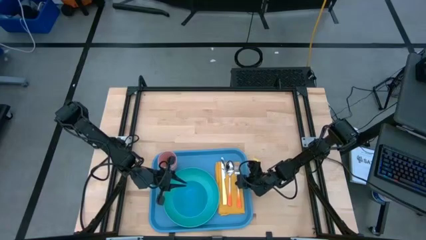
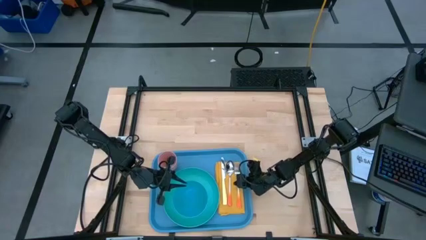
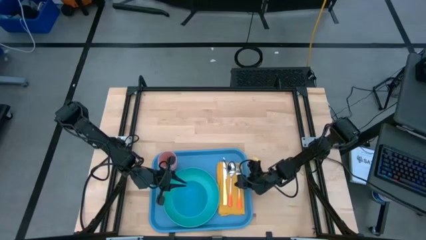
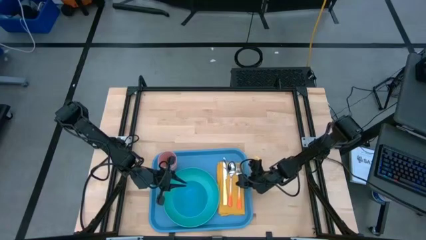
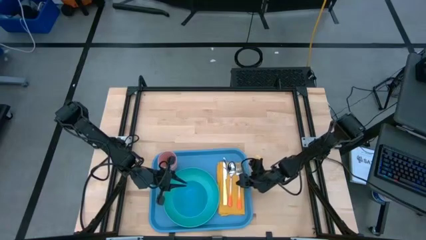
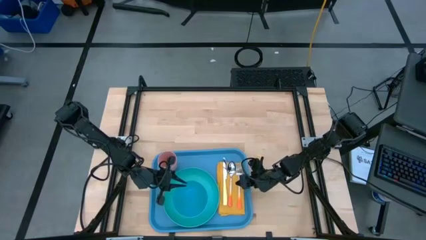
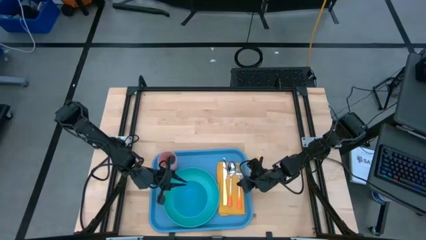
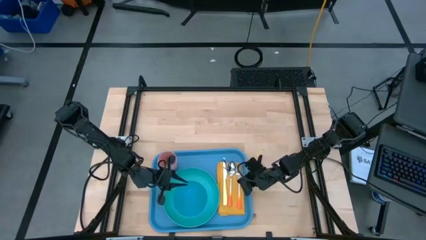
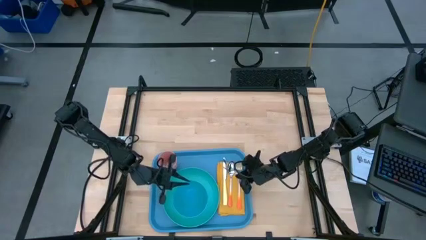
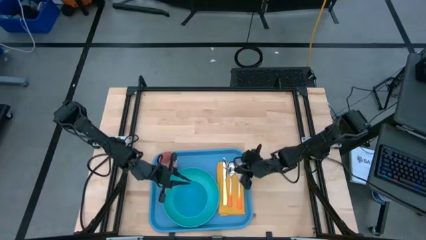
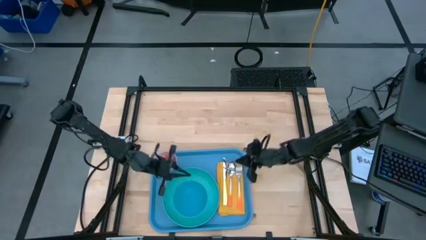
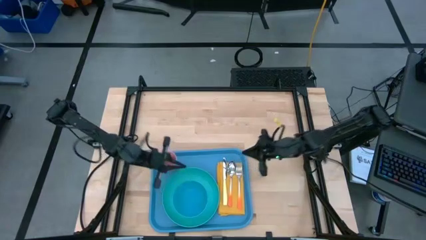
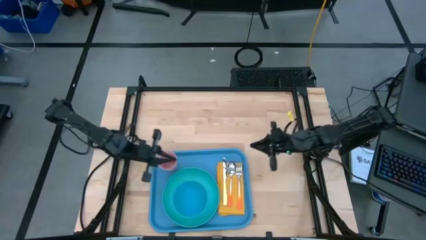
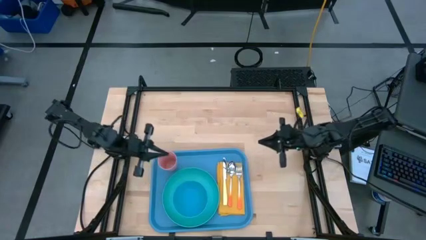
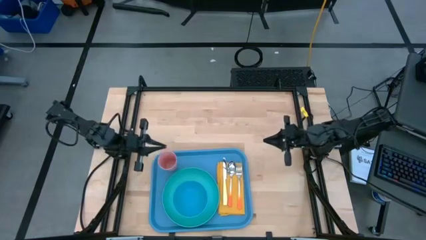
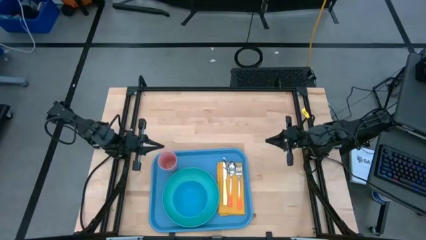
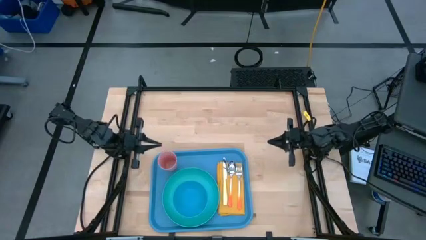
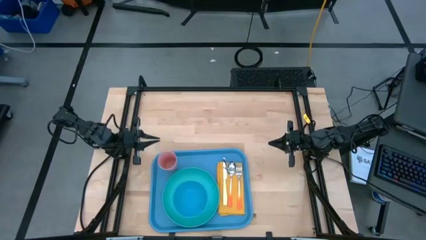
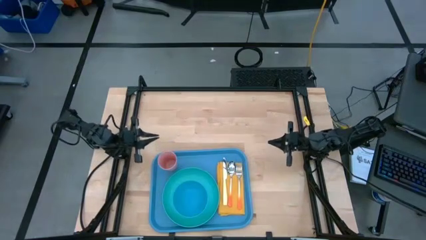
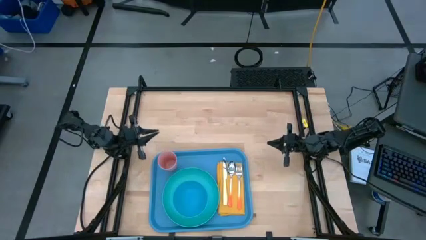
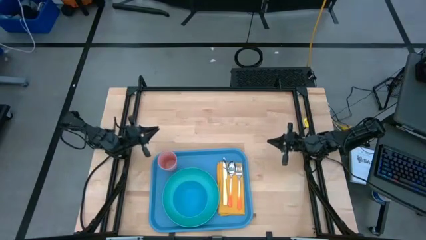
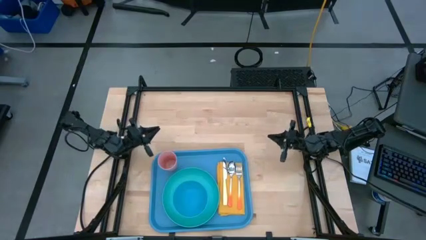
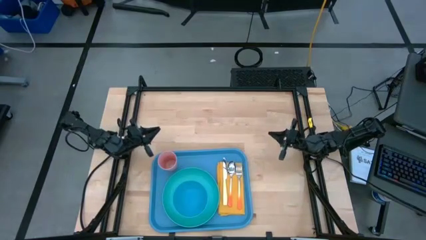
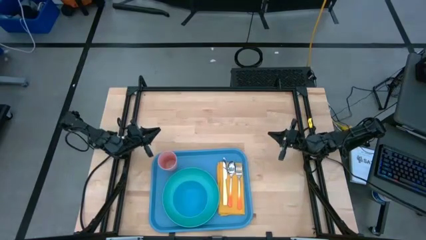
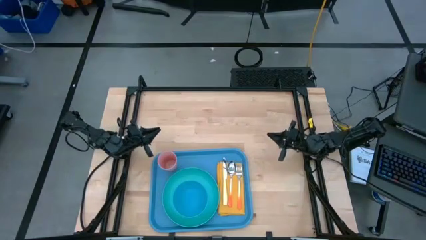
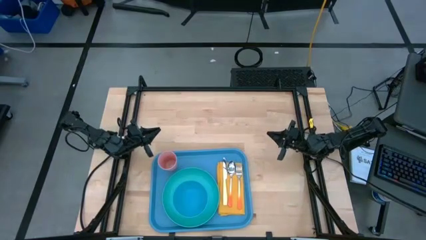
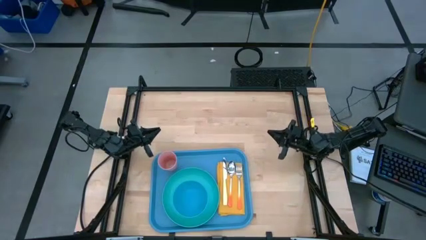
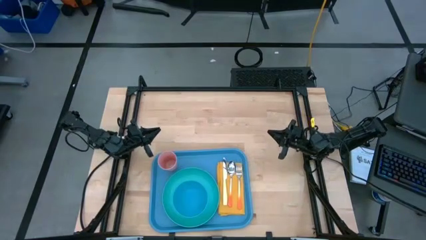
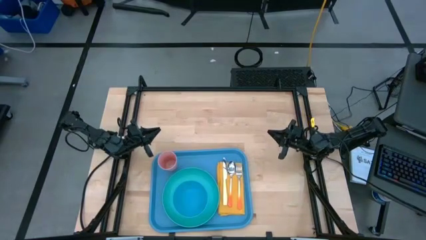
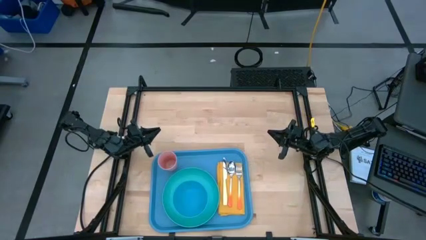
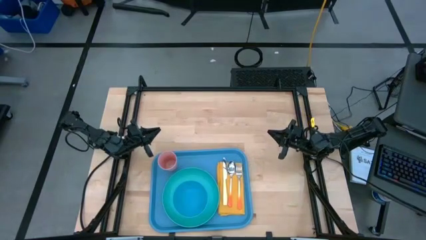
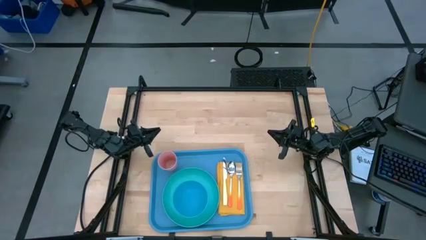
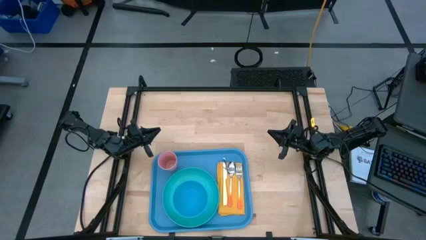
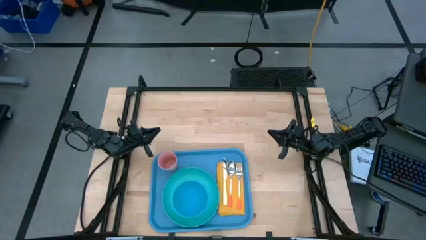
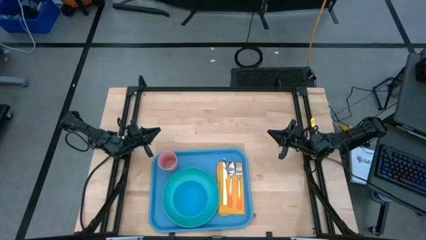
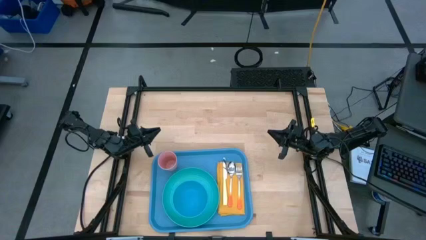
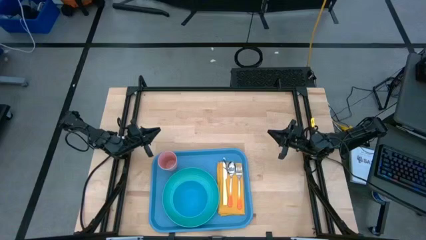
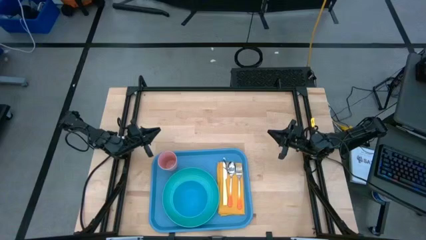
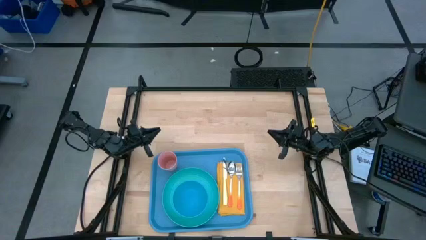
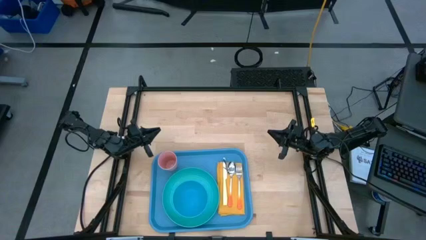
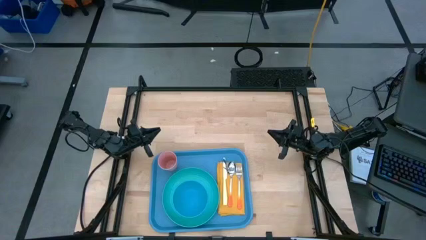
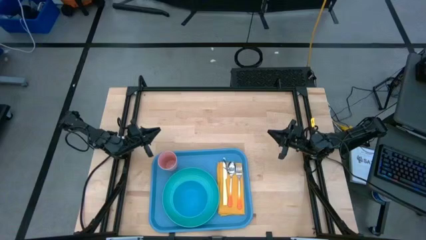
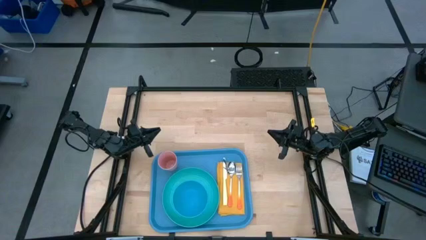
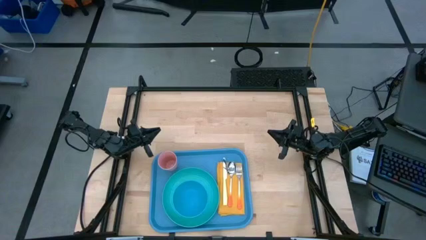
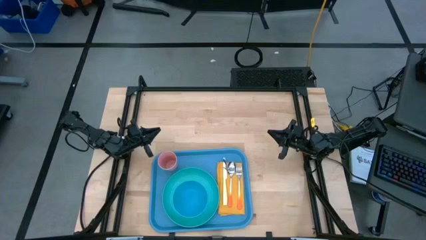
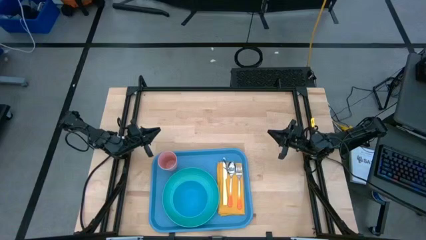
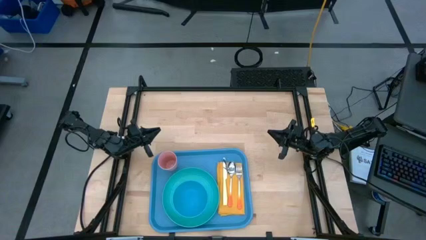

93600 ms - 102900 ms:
Task: Set up tray
Return to Home Position

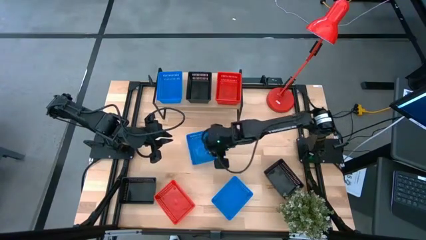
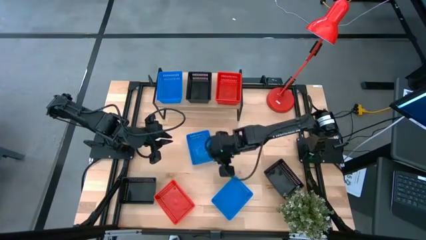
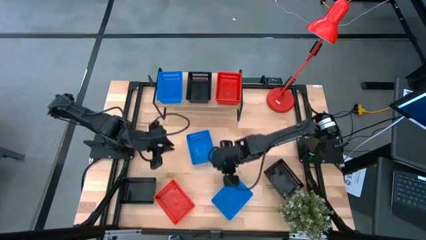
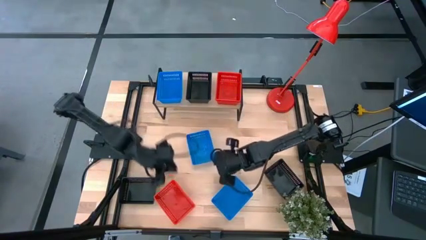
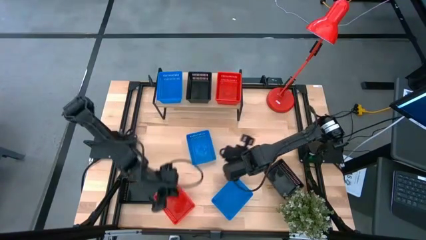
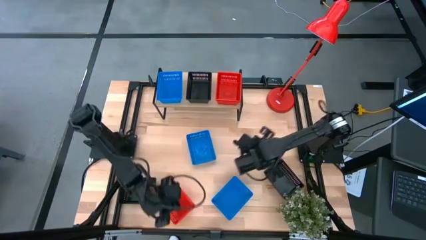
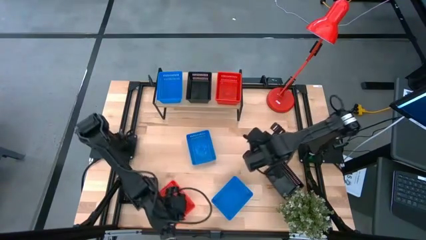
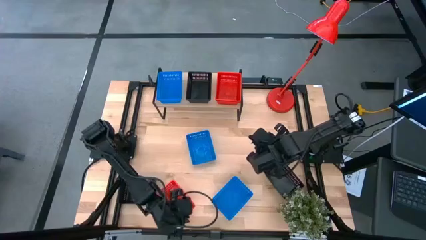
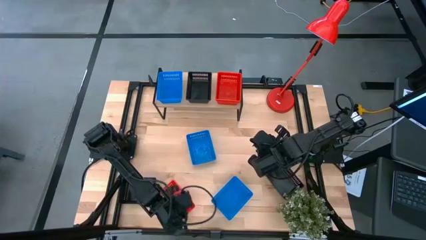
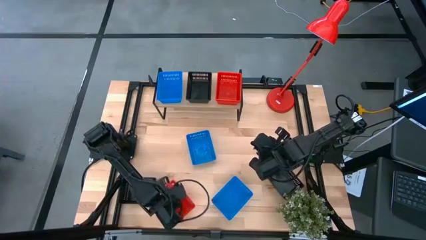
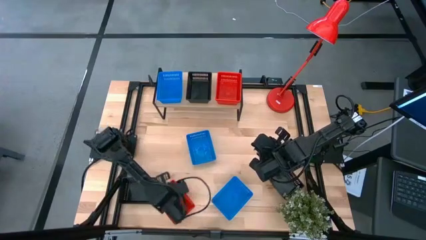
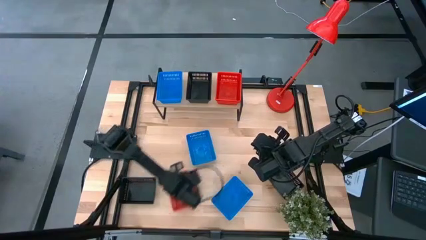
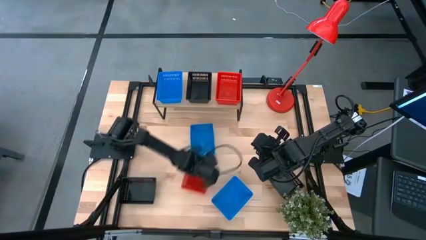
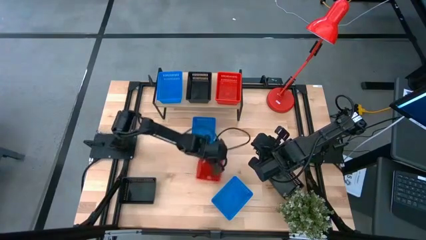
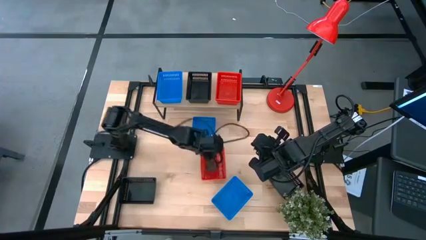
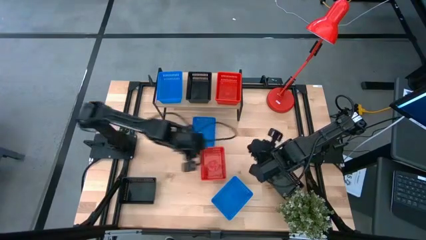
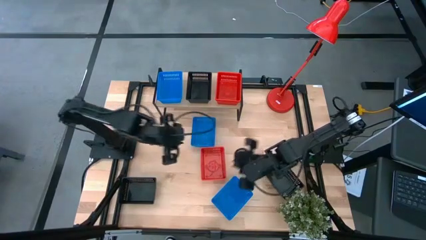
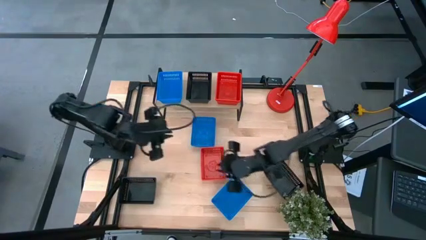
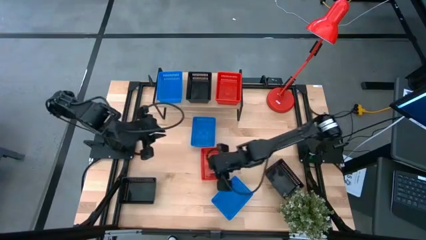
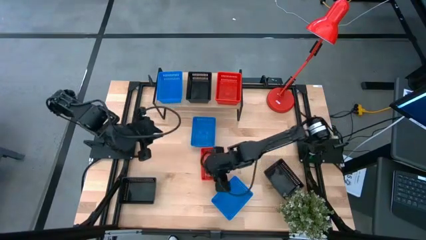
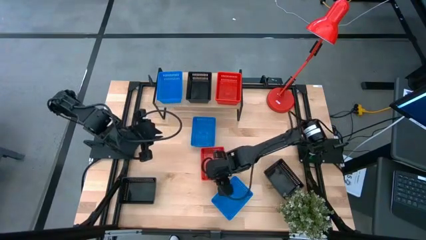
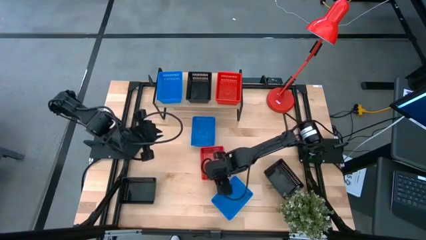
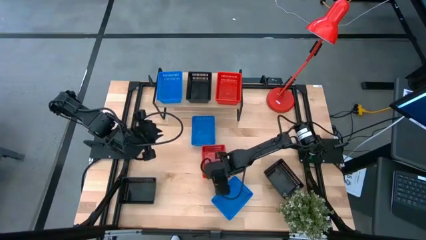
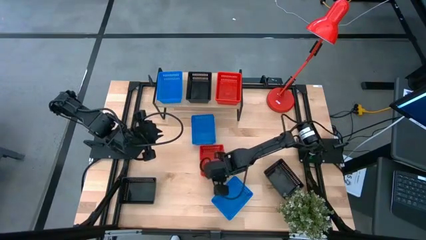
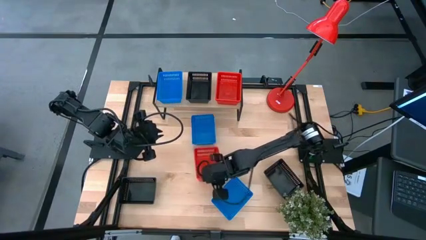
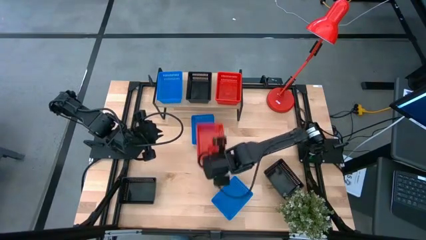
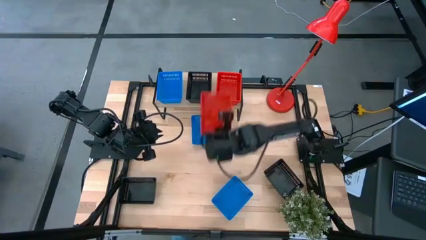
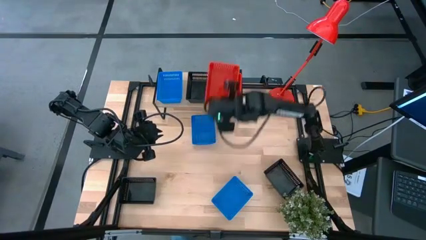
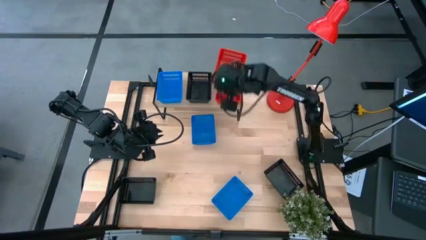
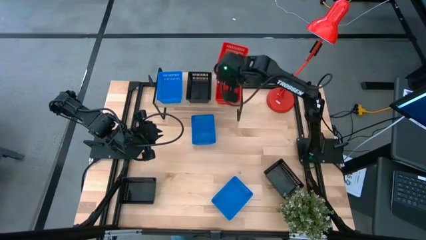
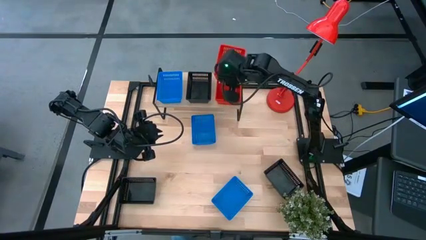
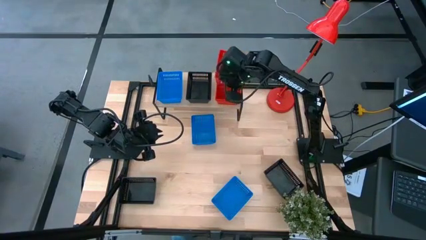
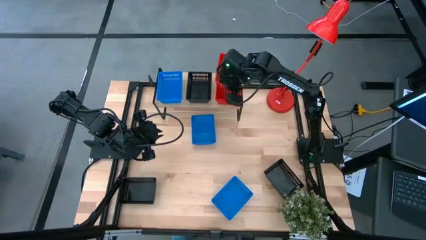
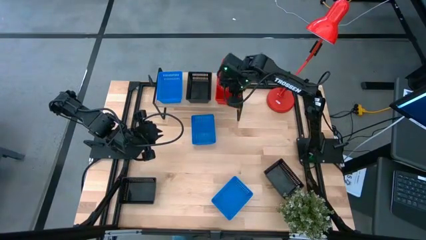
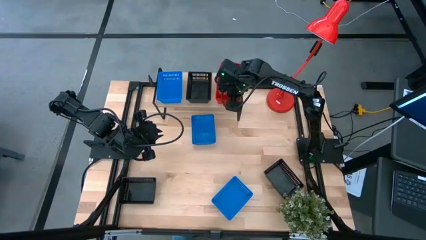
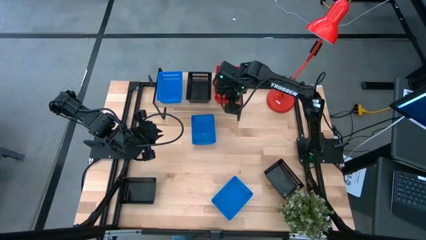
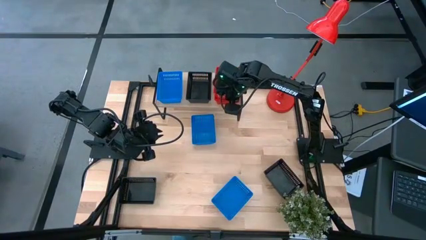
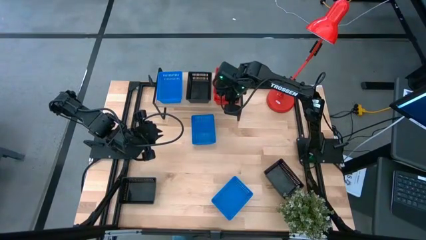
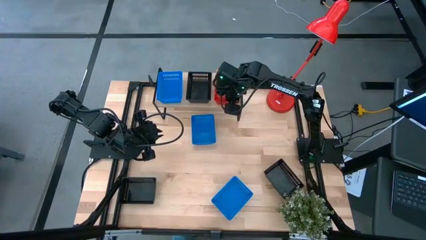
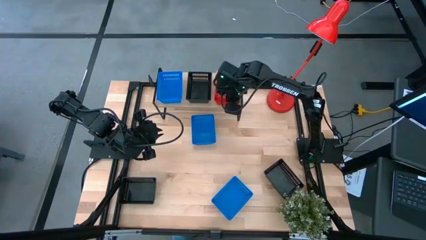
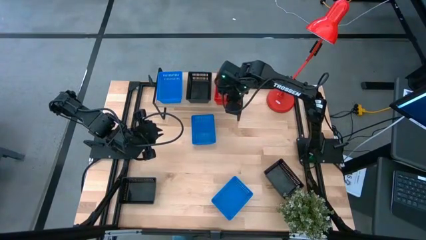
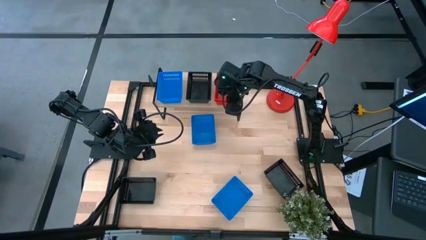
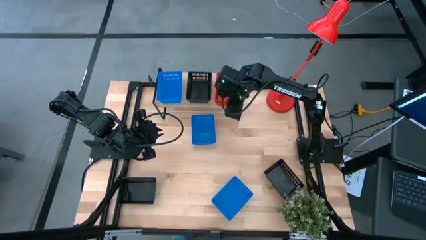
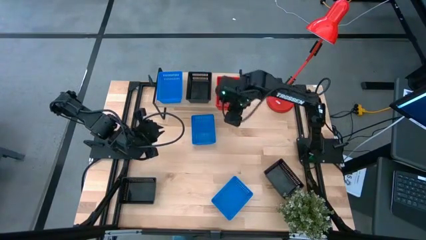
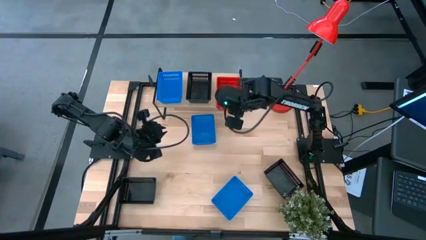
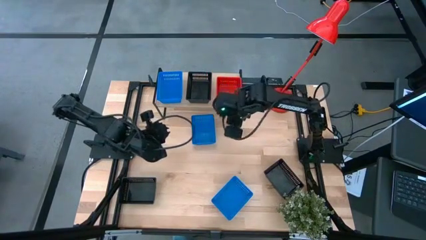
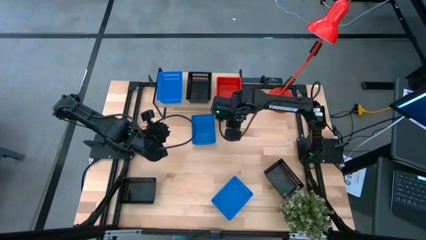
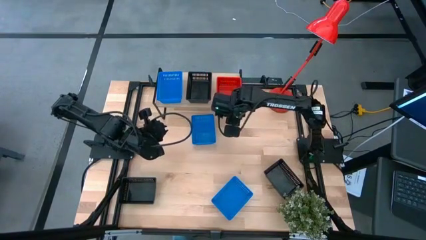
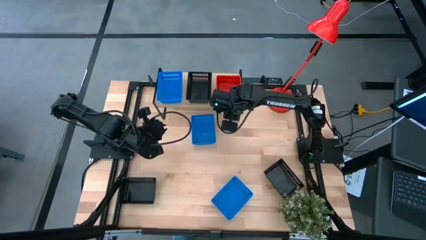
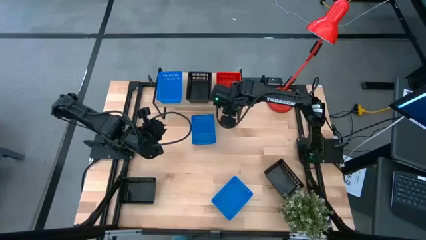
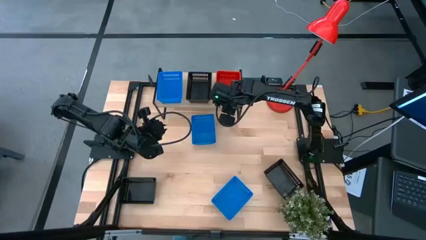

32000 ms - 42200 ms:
Task: Stack baskets on shelf by color
Stack the red bin on top of the red bins on the shelf
